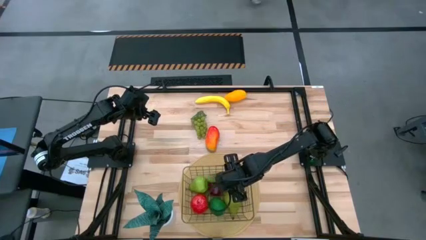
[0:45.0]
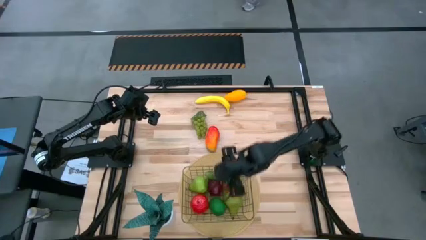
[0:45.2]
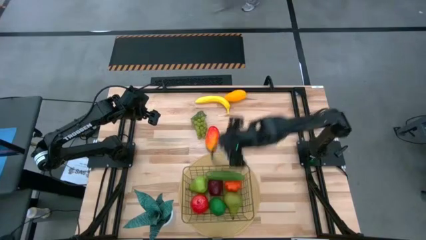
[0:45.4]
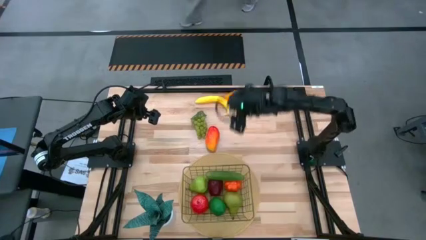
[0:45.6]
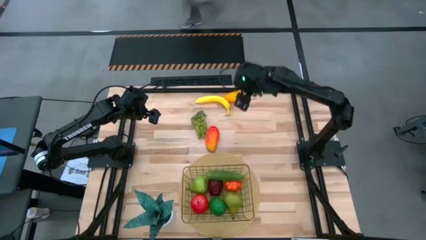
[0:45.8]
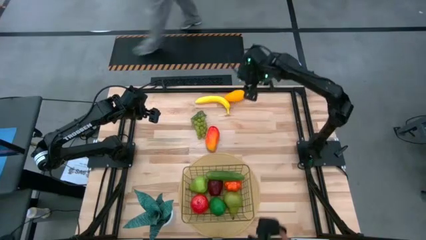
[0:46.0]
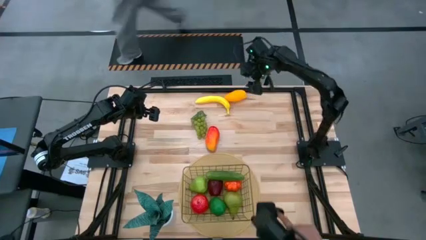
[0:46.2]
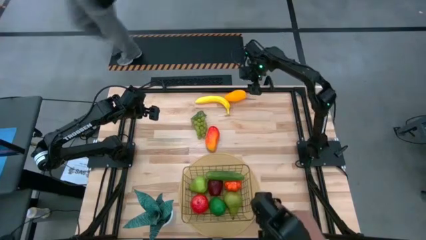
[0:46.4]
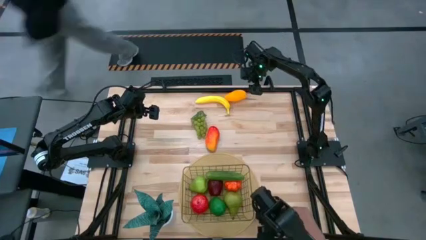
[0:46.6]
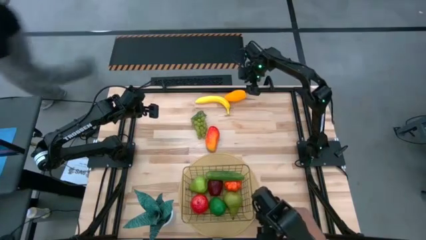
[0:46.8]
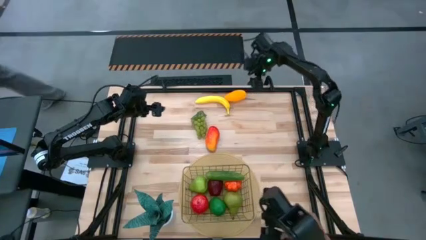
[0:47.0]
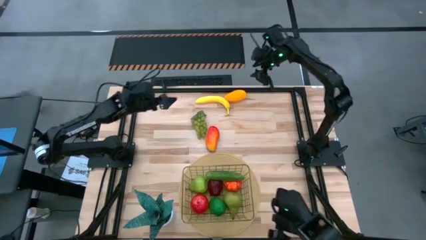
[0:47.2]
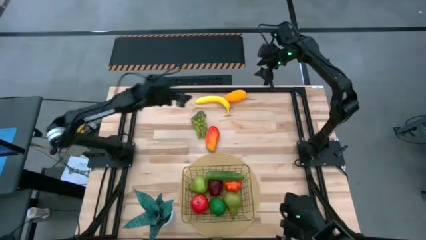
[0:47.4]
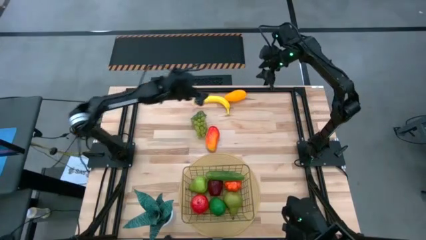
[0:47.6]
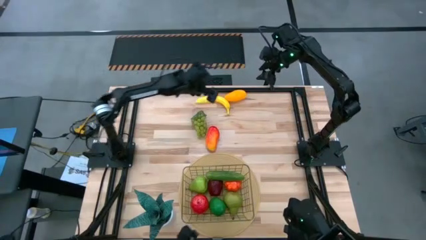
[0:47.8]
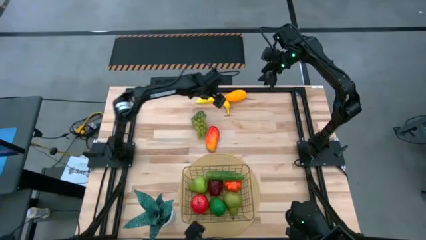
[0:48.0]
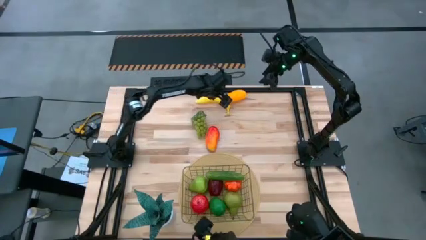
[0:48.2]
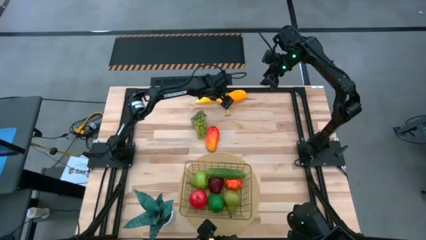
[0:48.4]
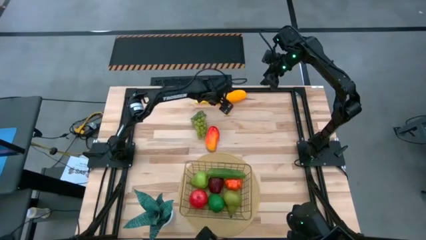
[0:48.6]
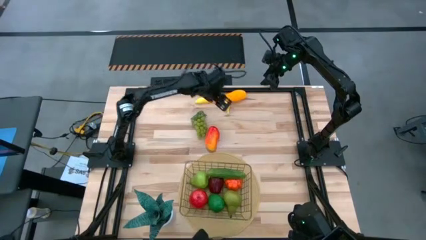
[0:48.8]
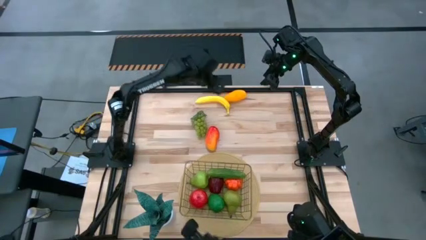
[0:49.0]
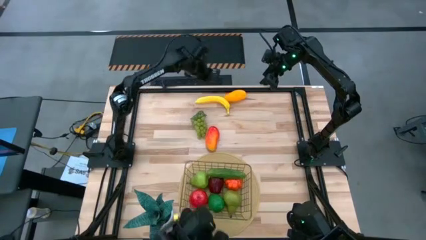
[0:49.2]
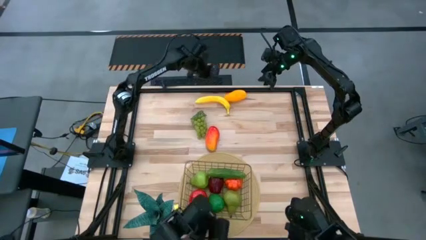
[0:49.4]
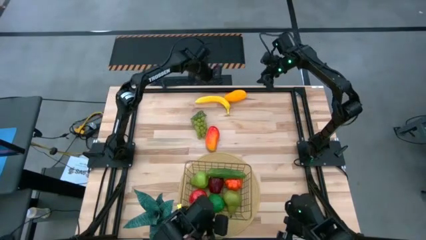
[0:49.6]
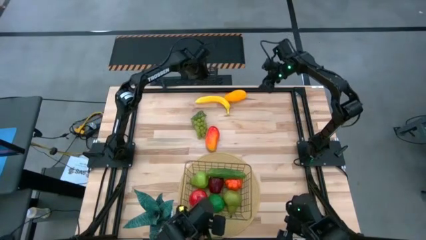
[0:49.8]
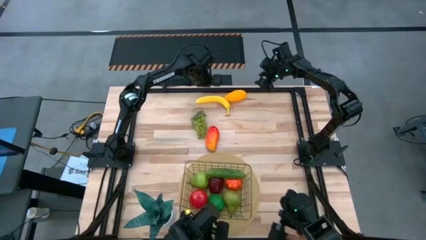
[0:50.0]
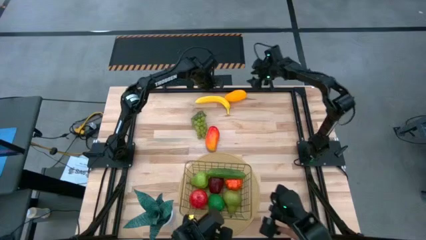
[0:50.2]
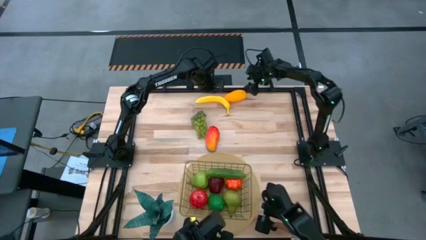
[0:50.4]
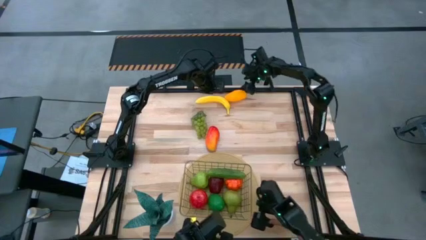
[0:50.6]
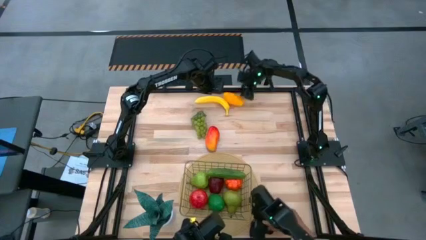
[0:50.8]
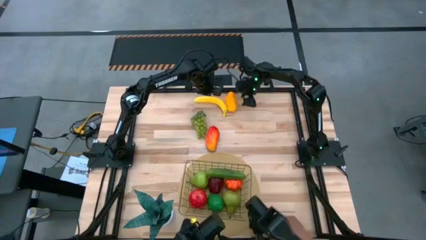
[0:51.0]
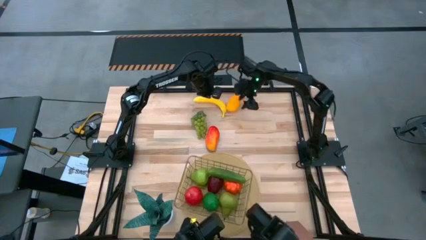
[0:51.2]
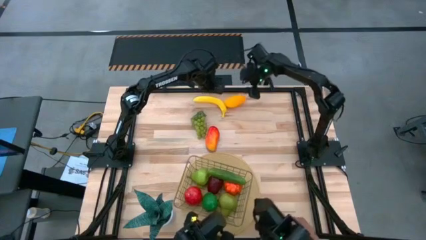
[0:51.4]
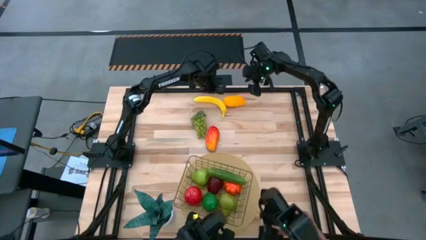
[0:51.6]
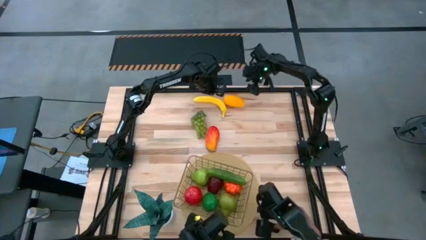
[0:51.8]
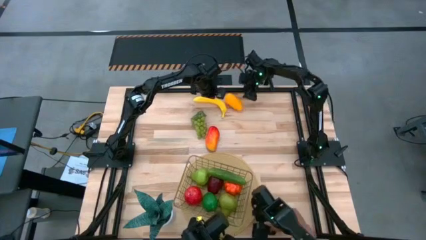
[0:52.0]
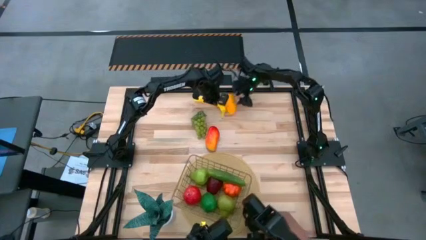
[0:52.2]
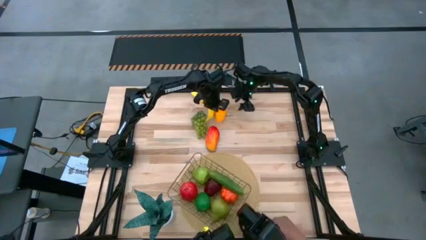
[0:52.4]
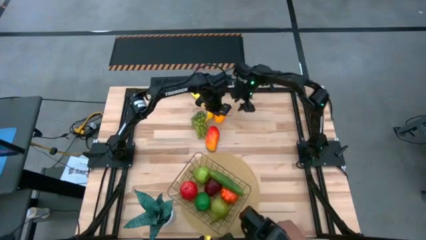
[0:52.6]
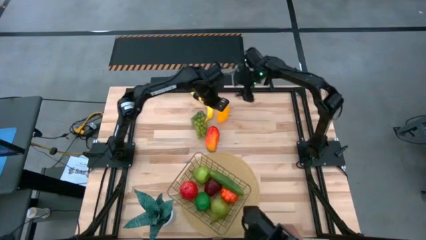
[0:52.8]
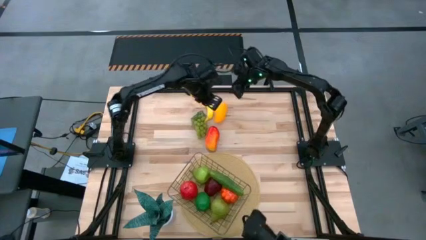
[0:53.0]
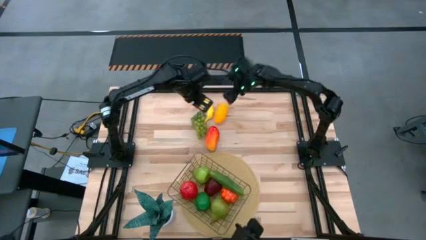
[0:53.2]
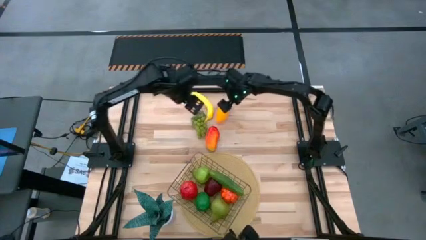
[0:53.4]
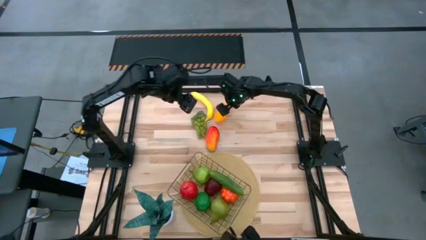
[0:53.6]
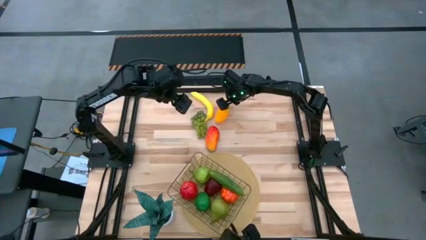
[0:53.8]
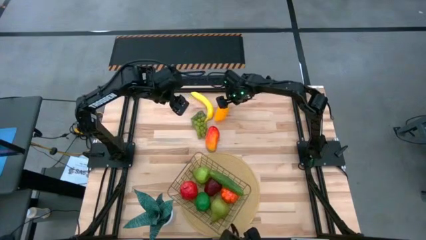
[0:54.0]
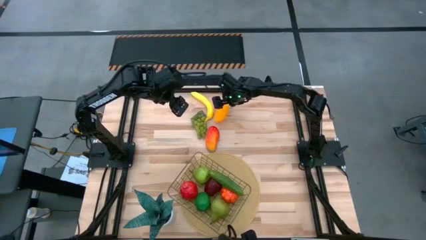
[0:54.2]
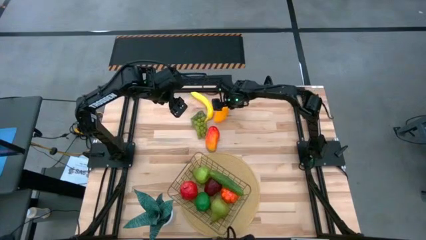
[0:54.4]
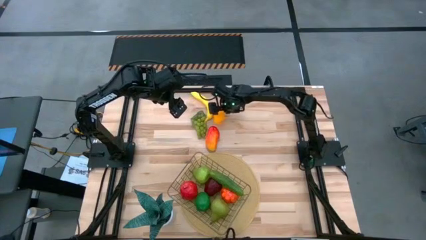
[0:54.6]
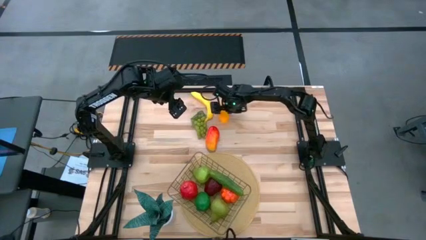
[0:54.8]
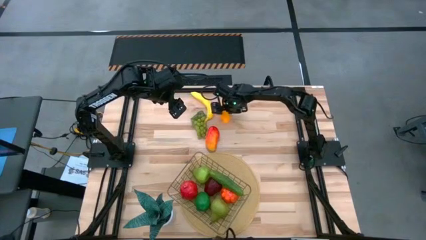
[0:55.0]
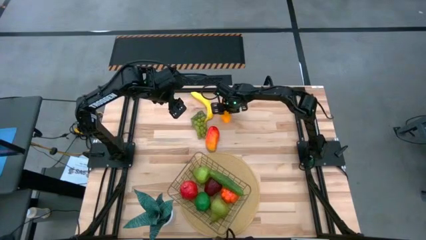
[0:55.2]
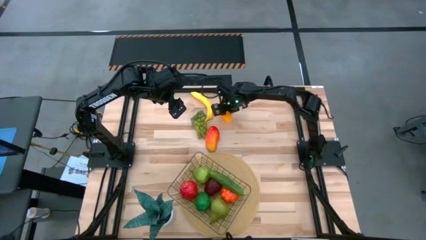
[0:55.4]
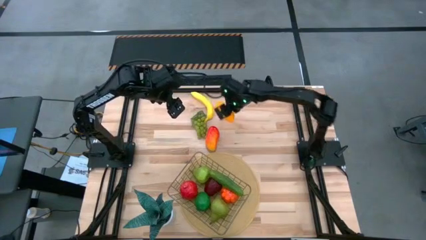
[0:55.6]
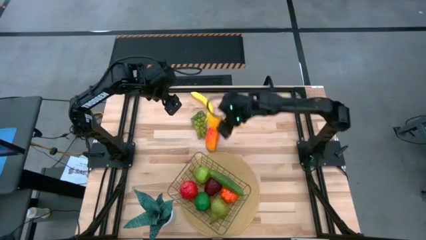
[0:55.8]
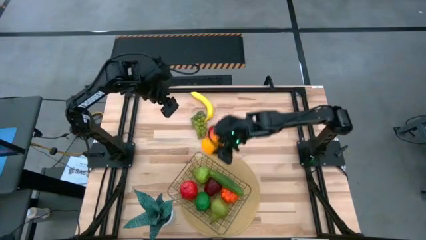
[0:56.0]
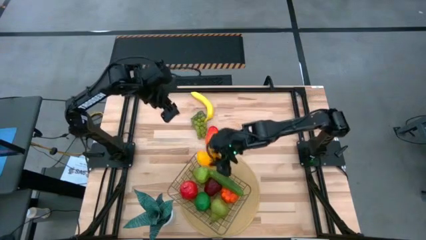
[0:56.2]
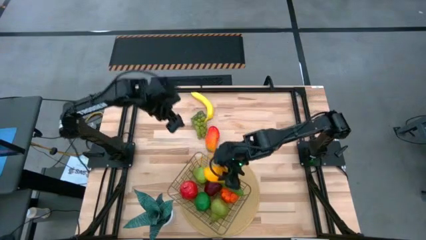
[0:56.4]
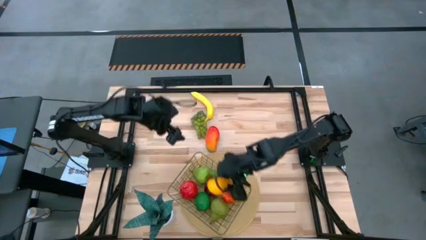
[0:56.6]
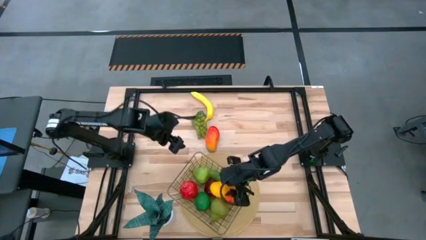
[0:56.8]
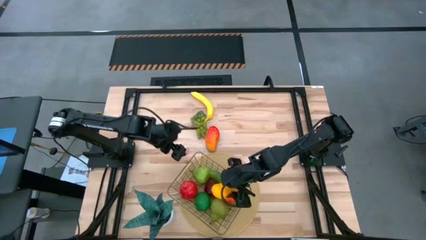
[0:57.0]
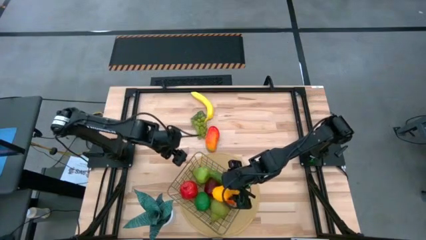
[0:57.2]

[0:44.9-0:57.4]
Task: Build produce basket
Put the yellow mango into the wire basket

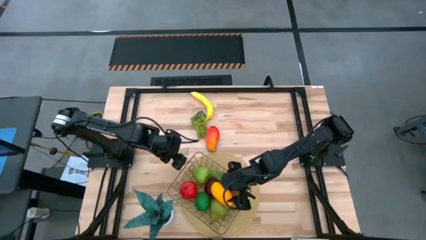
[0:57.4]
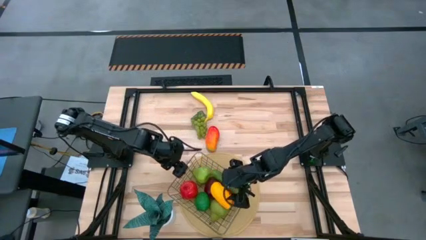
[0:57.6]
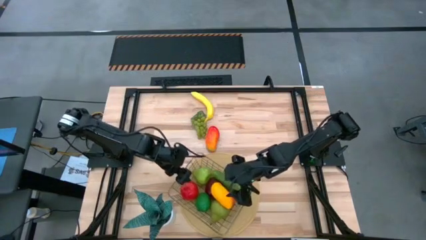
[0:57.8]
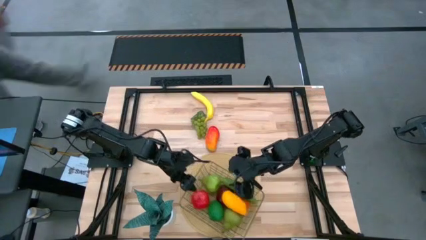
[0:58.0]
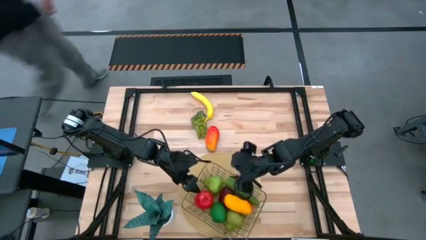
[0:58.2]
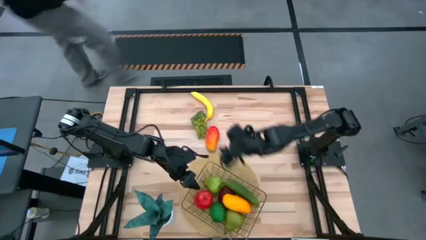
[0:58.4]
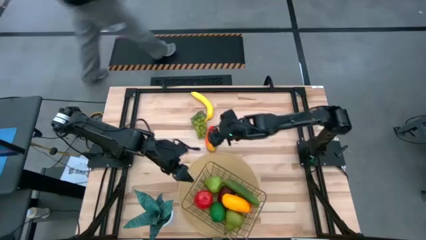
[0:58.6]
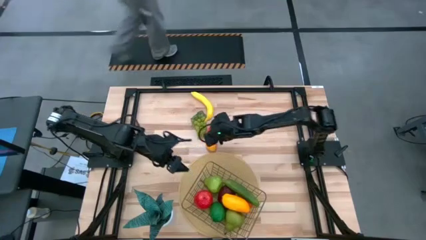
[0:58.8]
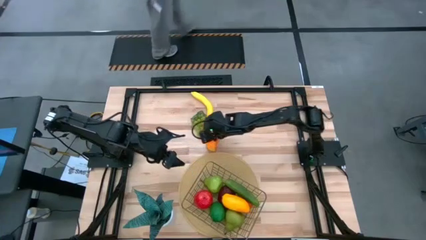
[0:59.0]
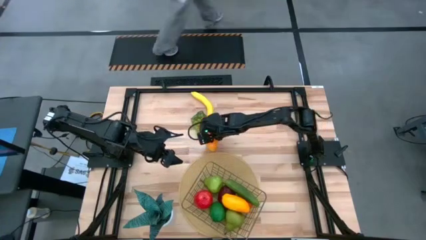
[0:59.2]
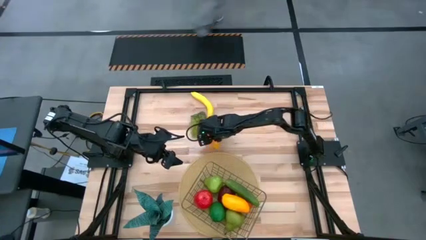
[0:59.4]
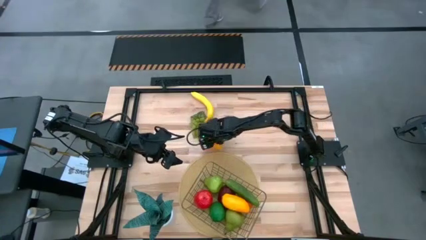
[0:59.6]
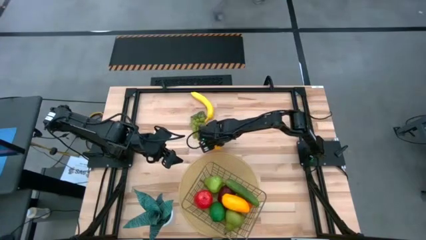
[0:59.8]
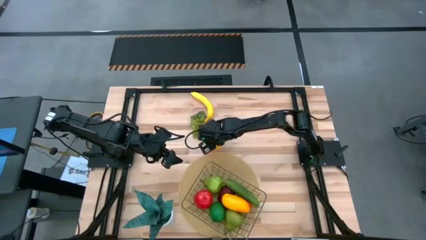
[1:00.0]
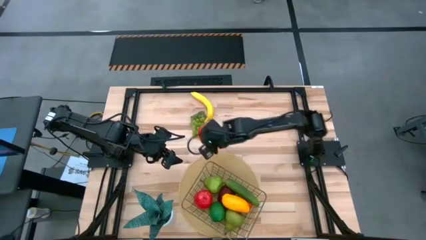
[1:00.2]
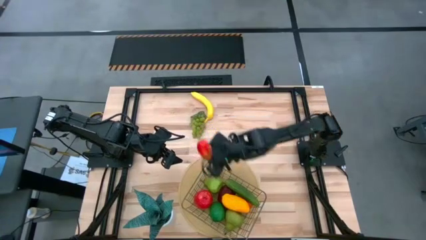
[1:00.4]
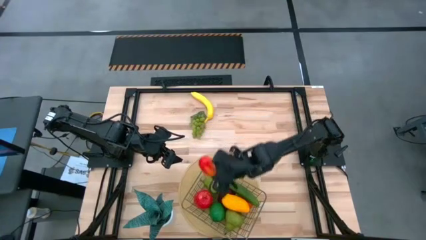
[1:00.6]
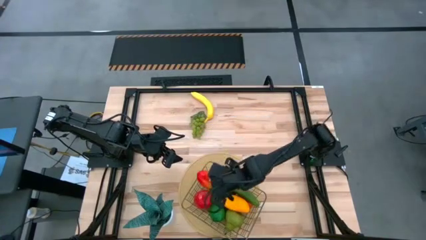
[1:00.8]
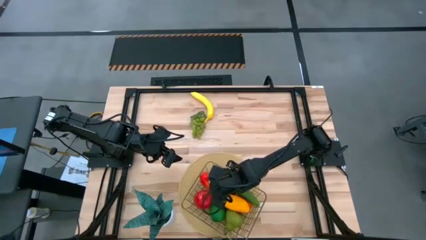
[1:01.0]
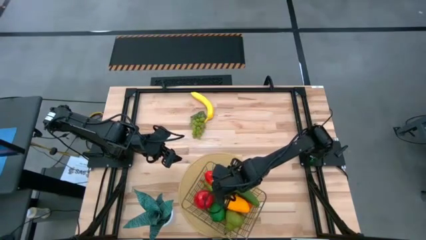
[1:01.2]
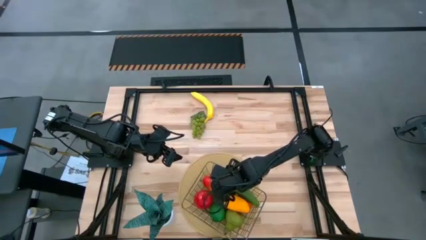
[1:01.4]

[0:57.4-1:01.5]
Put the red mango into the metallic basket
